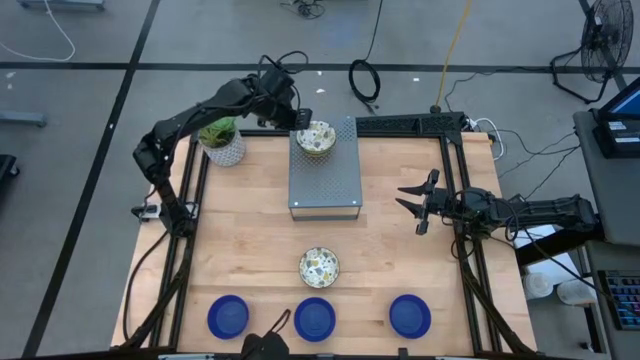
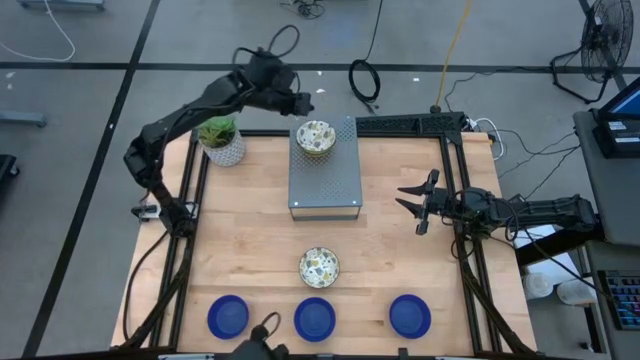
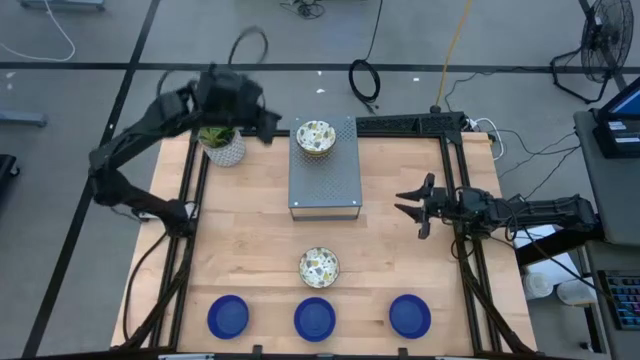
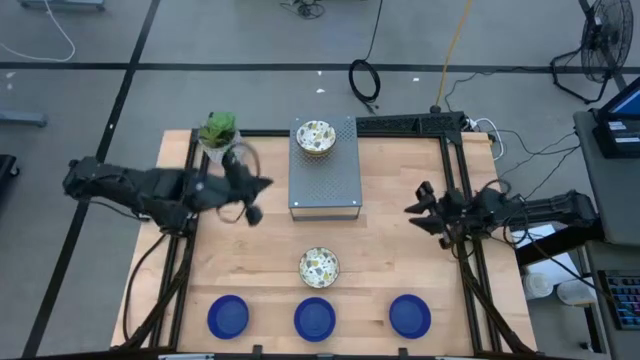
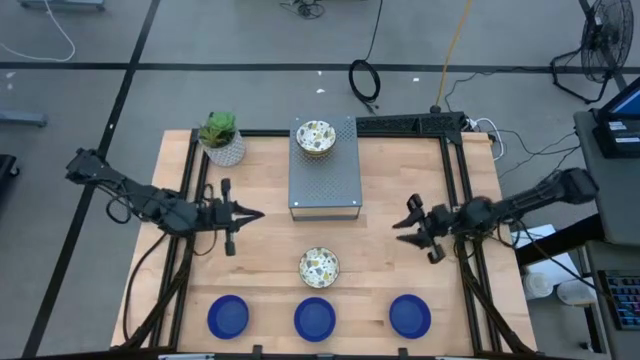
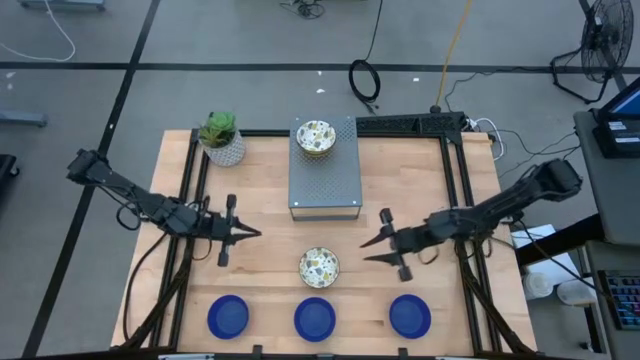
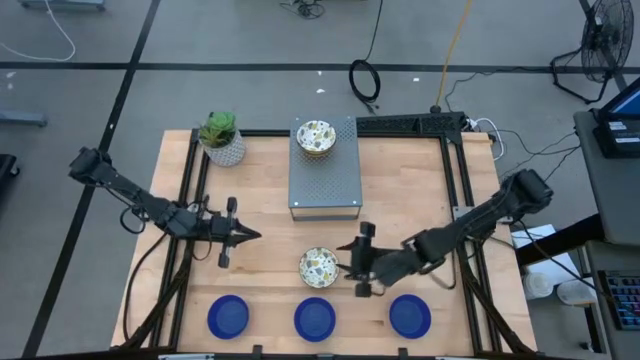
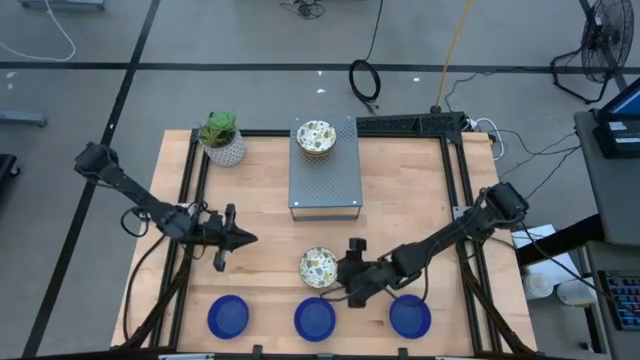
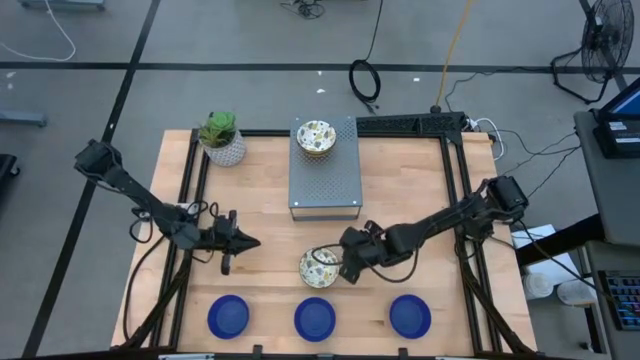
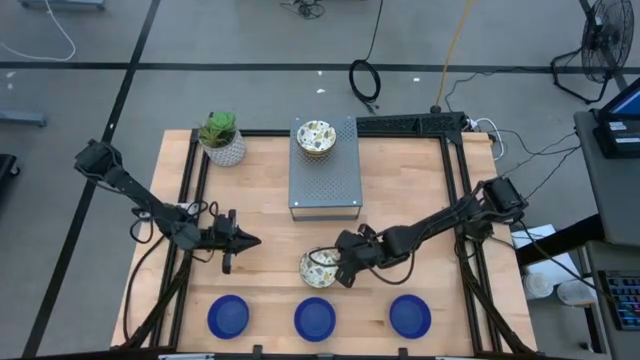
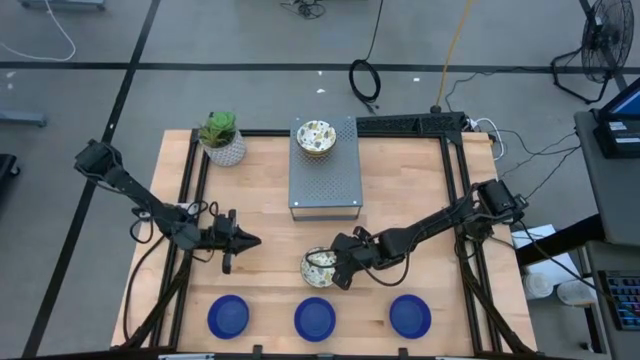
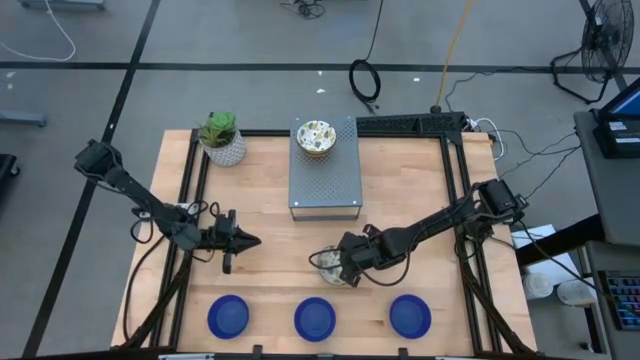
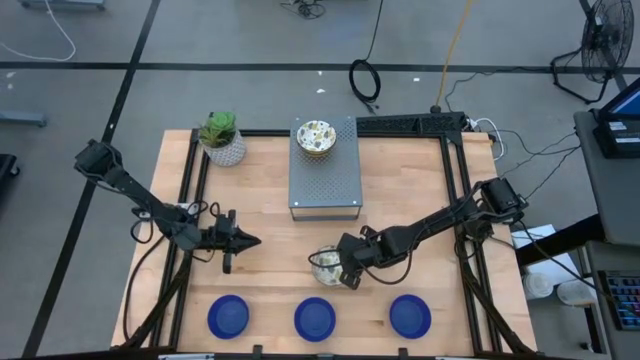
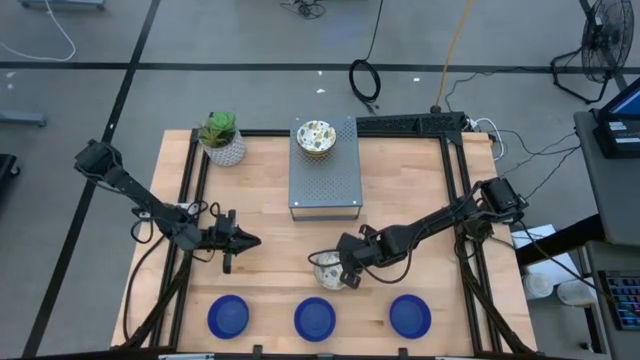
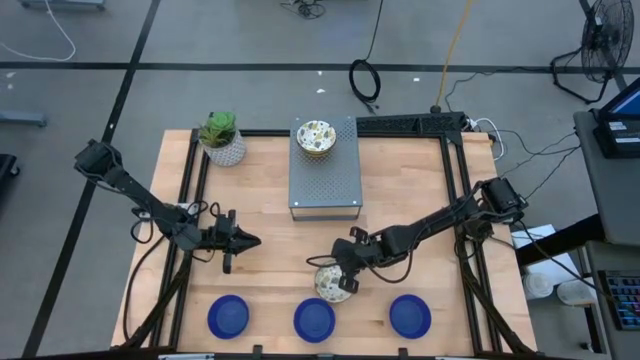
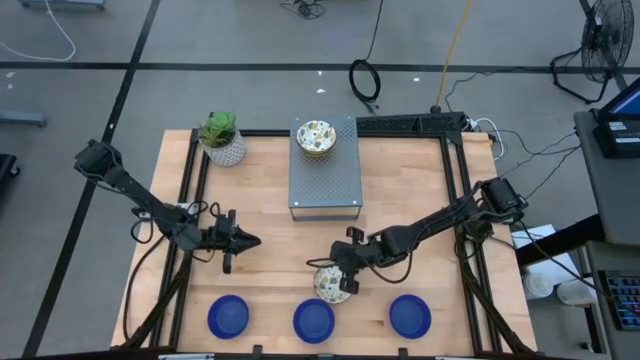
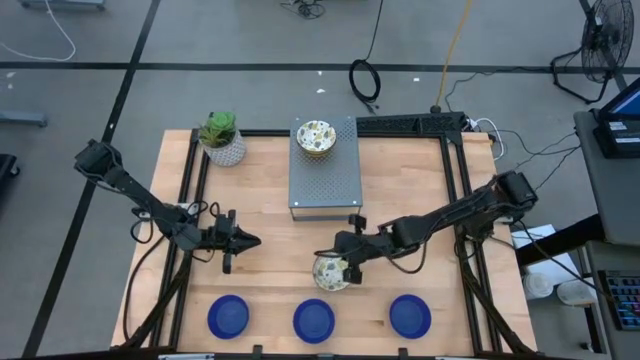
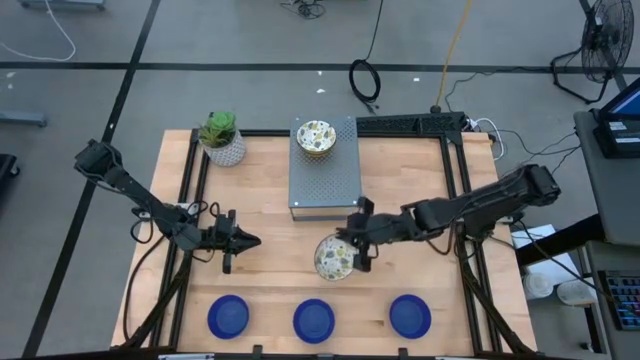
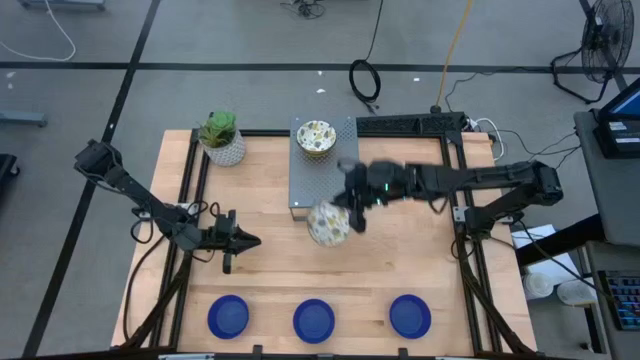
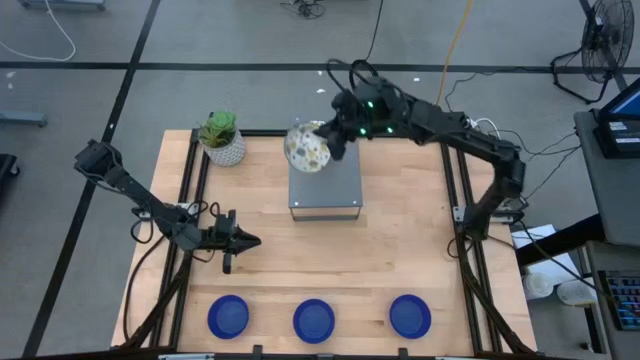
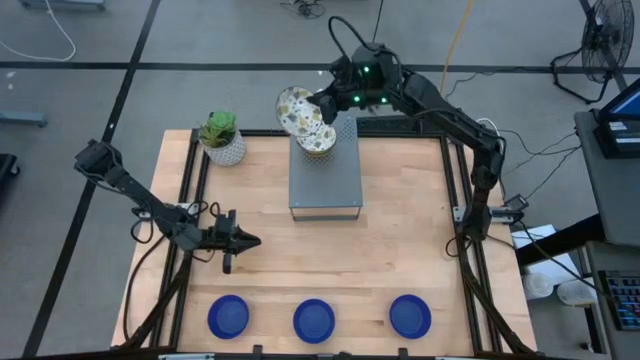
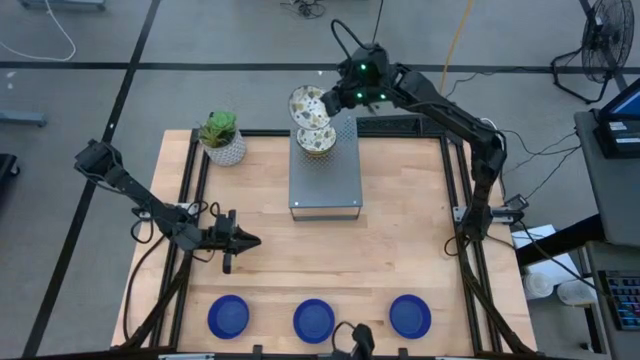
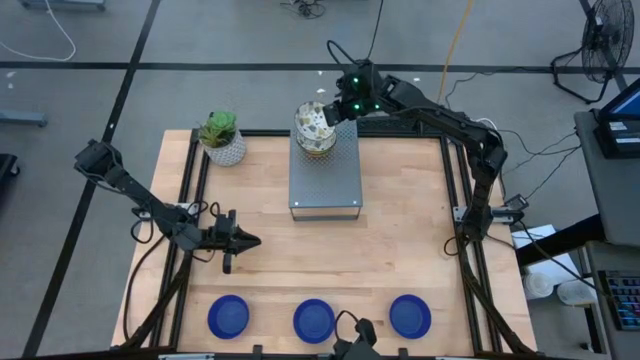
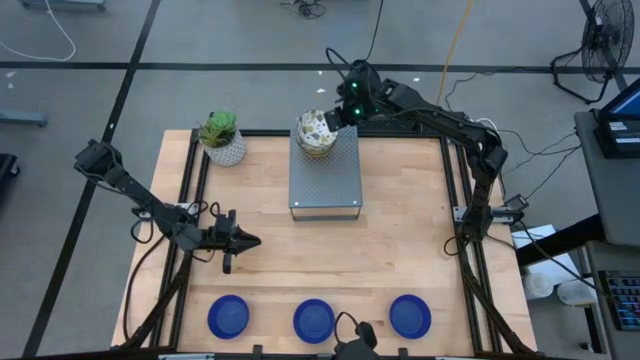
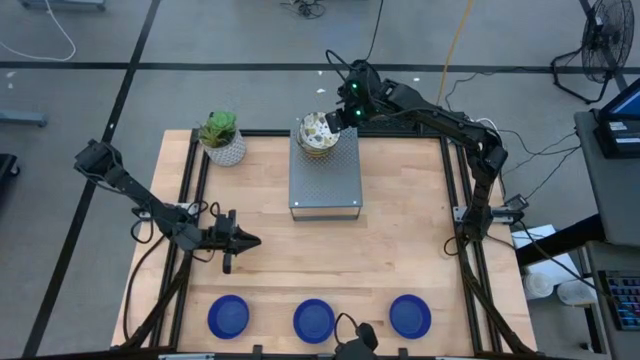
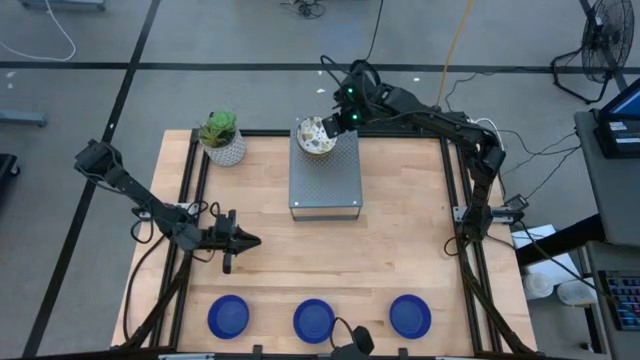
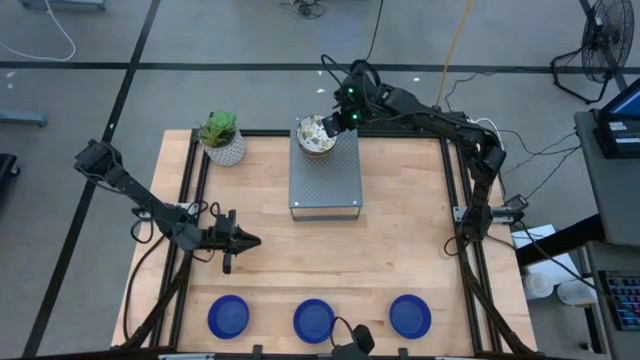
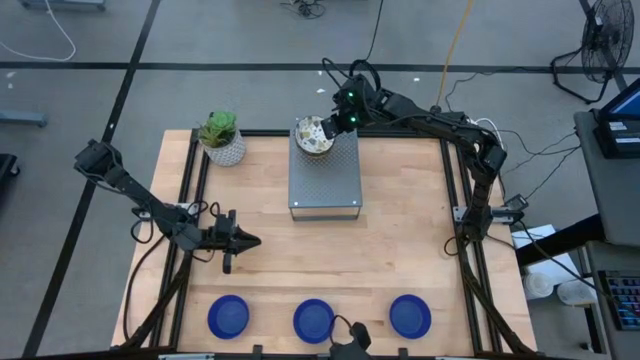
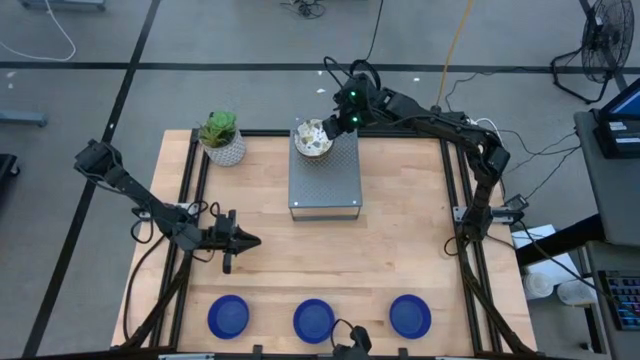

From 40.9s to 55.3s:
Task: Pick & Place Mini bowls
Stack the yellow patterned bowl on the yellow patterned bowl on the shelf

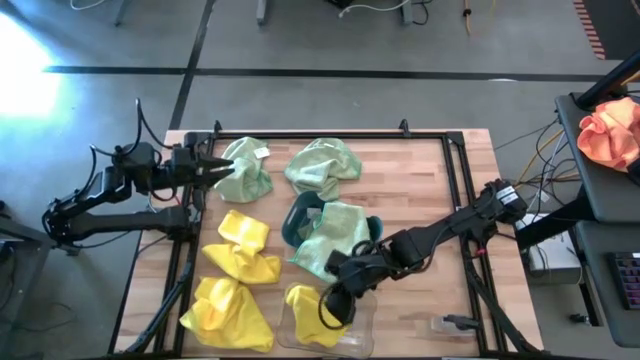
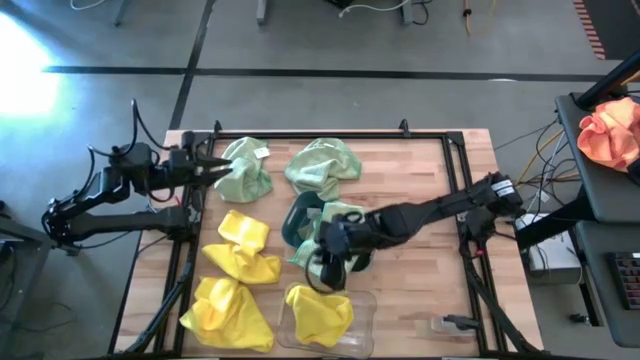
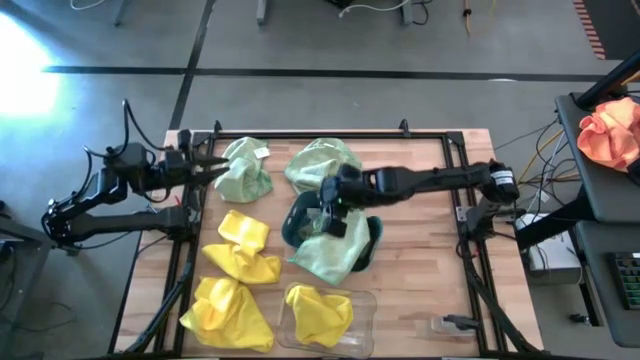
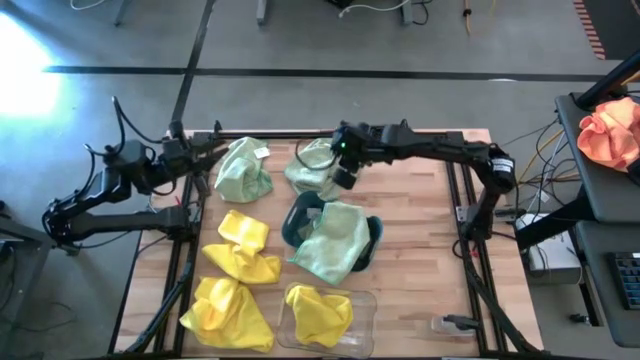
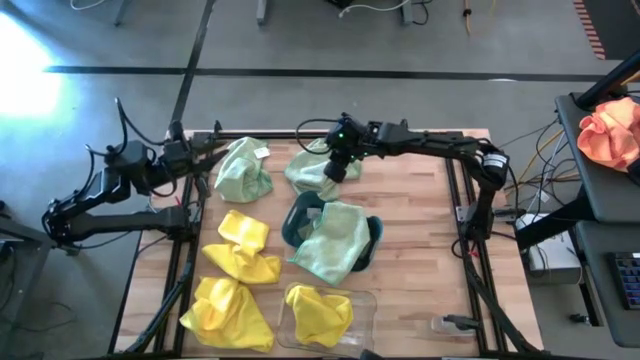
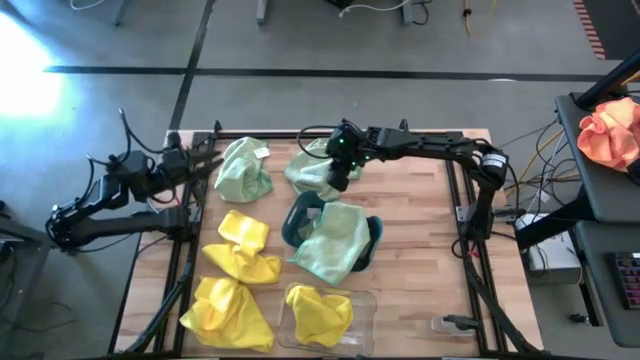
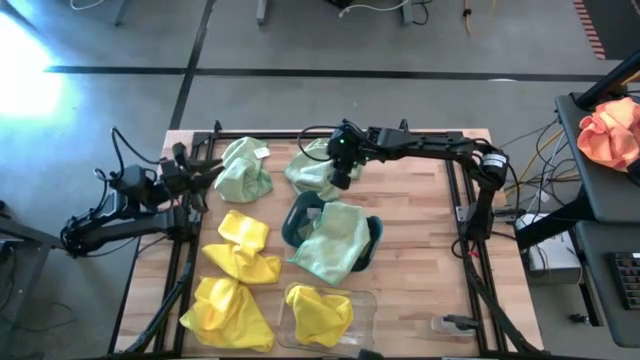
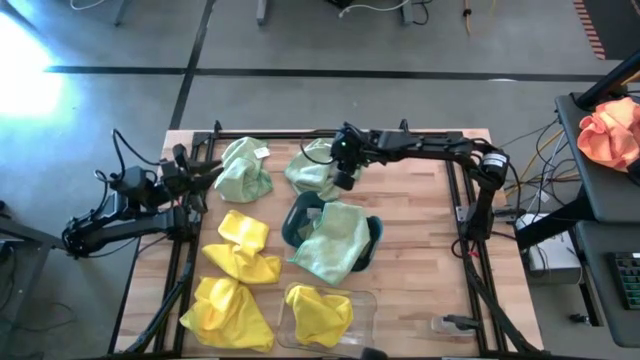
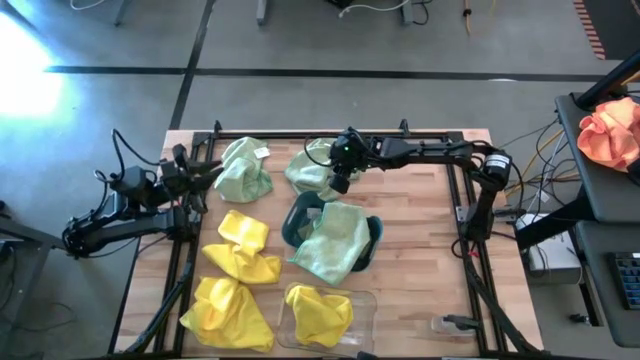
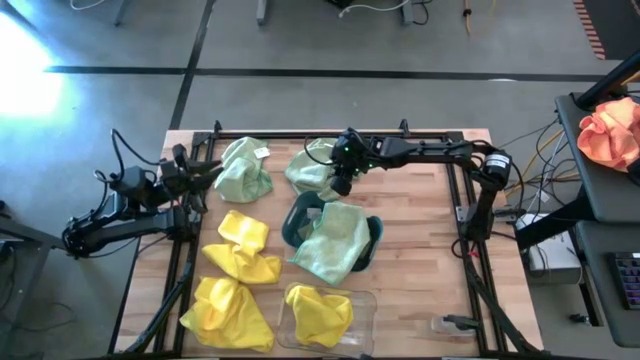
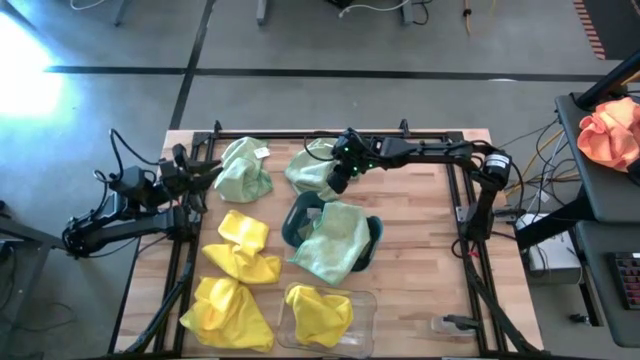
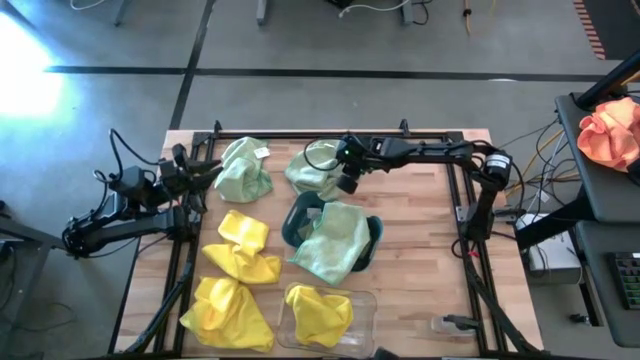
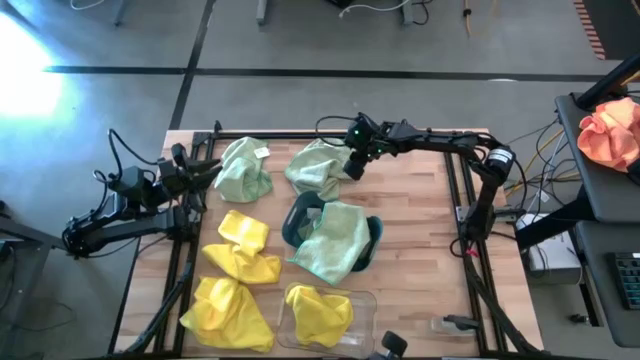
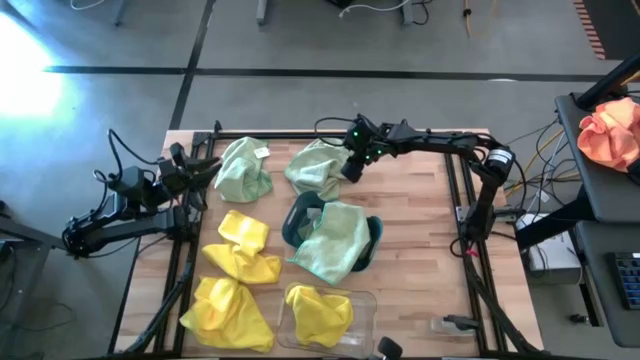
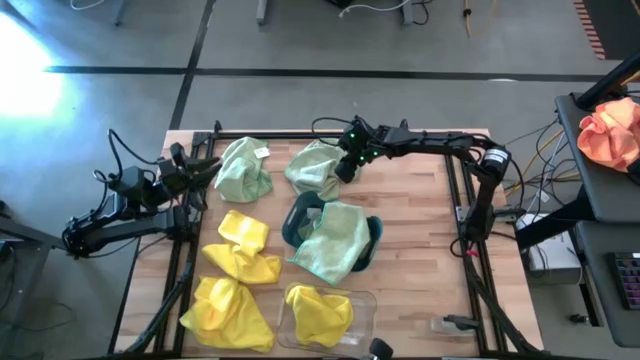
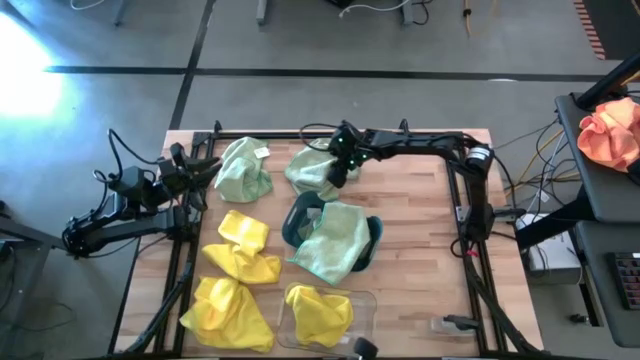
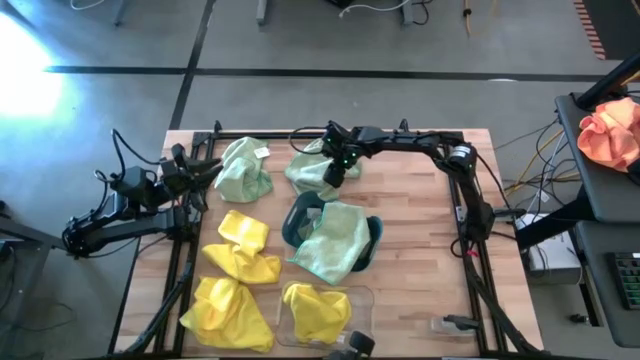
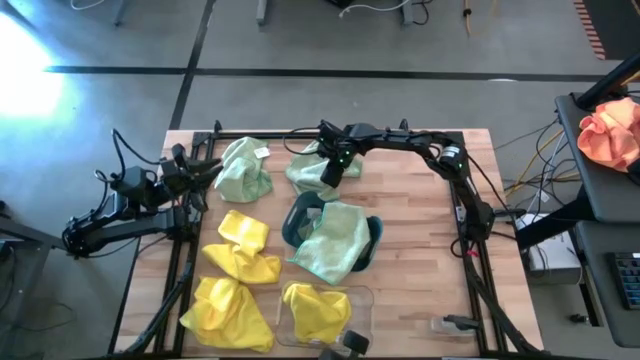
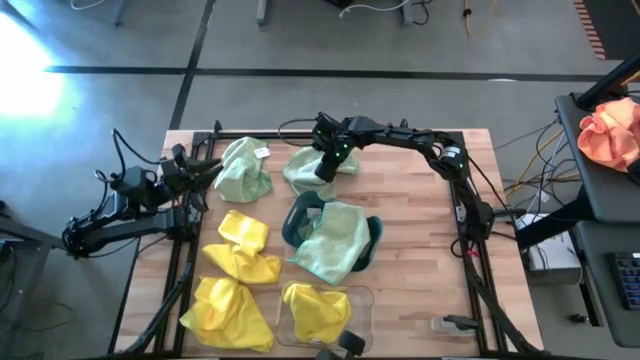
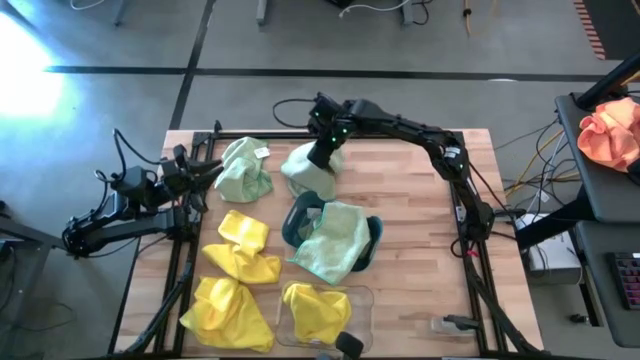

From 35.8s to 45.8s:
Task: Sort microfiber towel by color & place in baskets
Put the right green microfiber cloth into the blue bin
